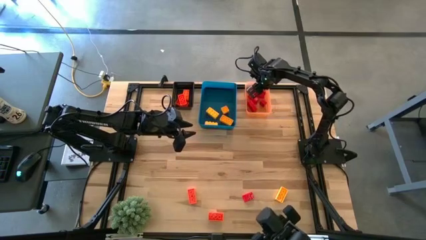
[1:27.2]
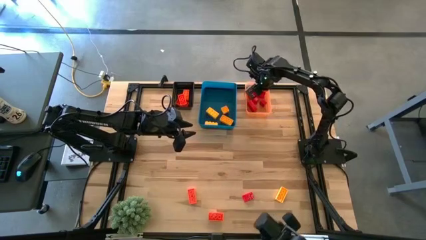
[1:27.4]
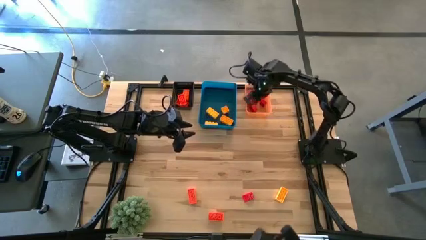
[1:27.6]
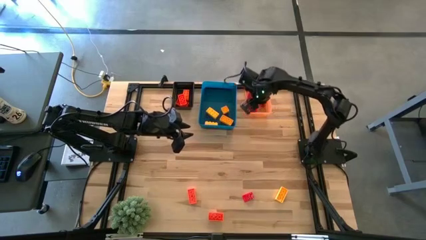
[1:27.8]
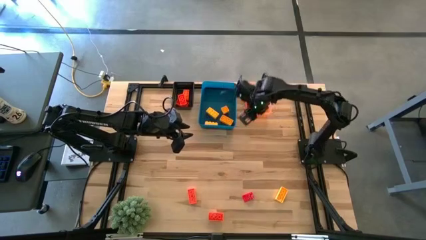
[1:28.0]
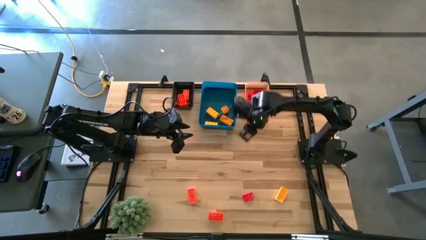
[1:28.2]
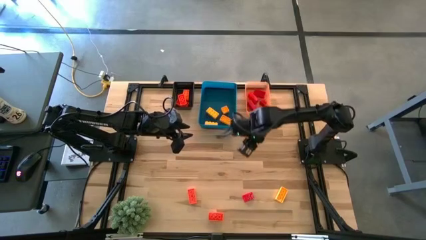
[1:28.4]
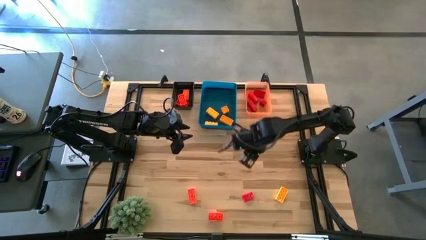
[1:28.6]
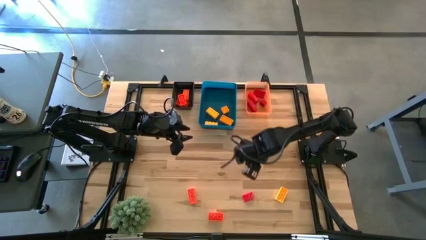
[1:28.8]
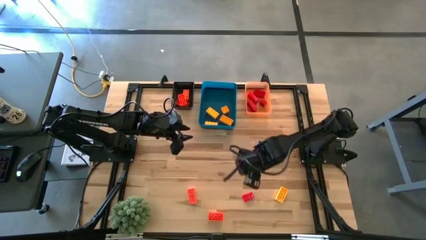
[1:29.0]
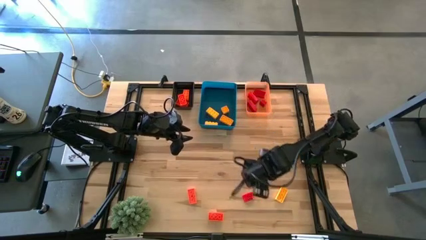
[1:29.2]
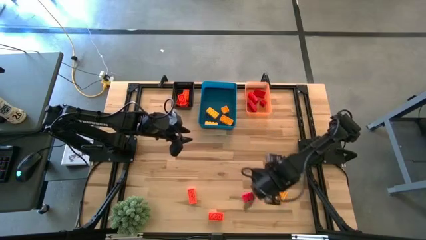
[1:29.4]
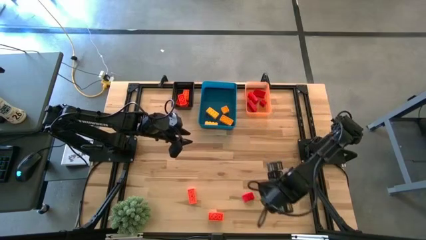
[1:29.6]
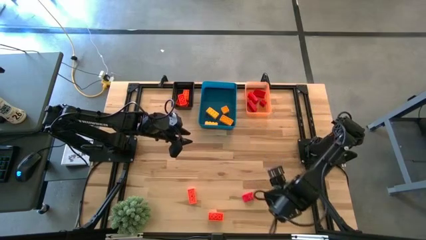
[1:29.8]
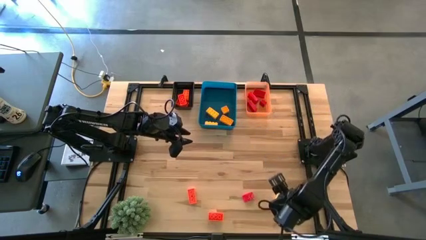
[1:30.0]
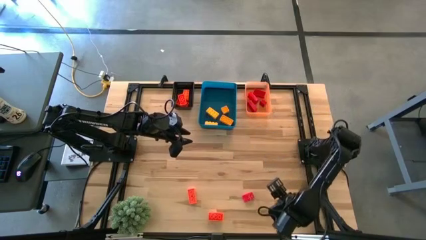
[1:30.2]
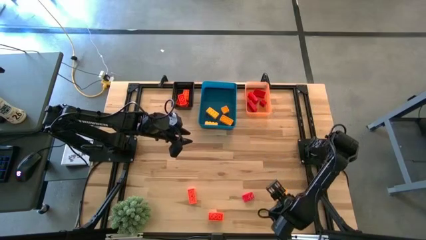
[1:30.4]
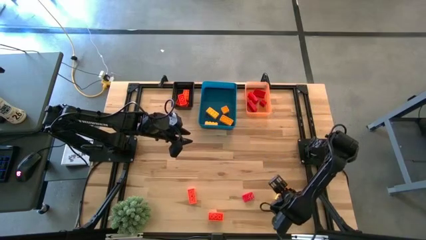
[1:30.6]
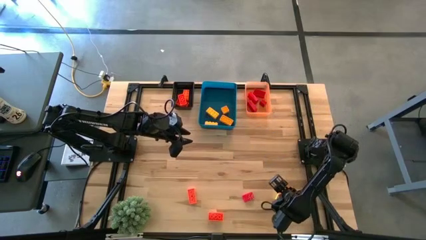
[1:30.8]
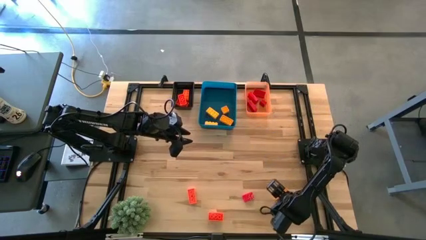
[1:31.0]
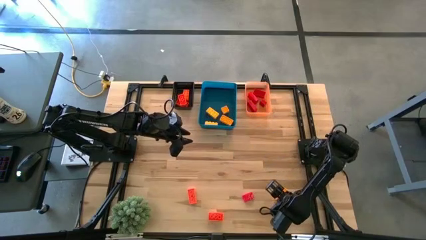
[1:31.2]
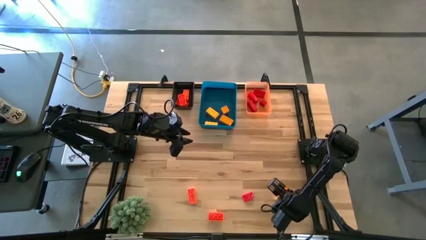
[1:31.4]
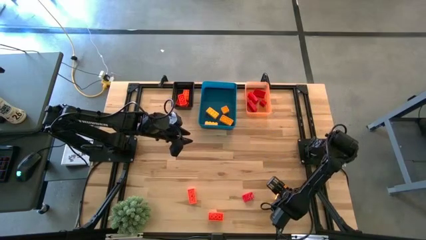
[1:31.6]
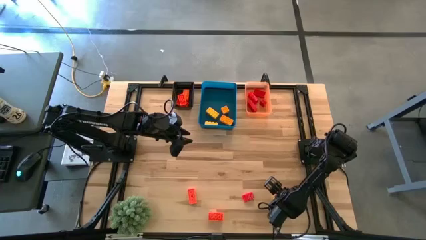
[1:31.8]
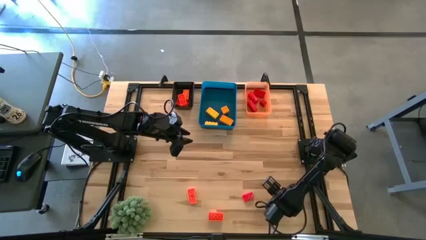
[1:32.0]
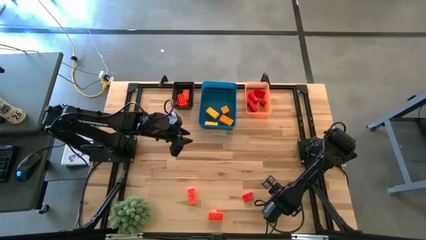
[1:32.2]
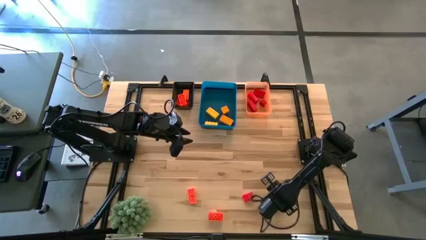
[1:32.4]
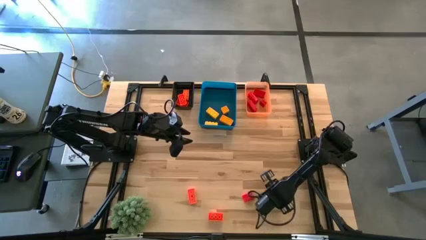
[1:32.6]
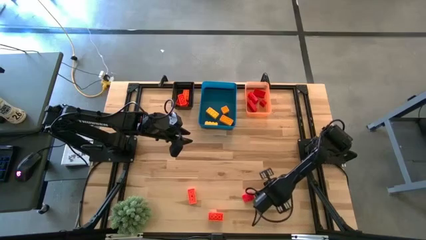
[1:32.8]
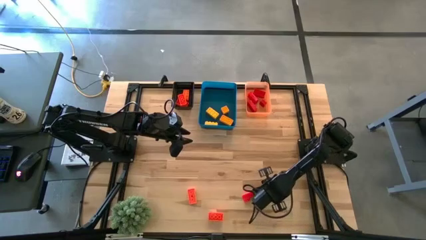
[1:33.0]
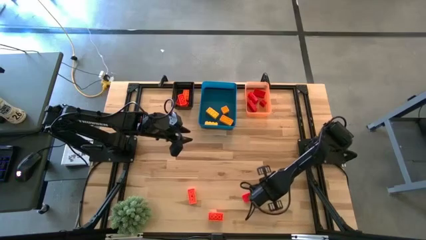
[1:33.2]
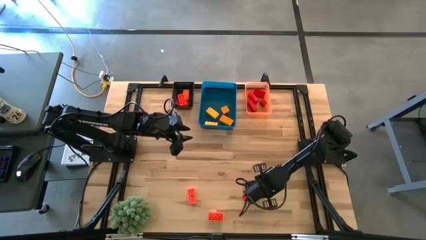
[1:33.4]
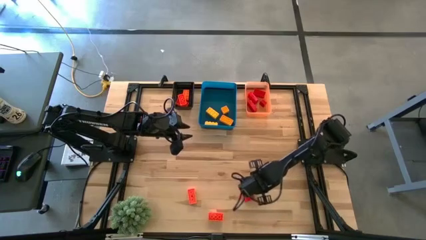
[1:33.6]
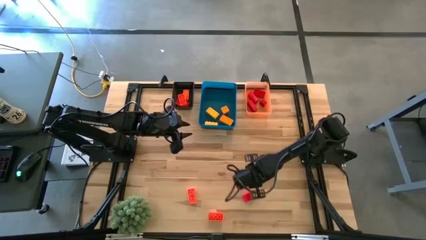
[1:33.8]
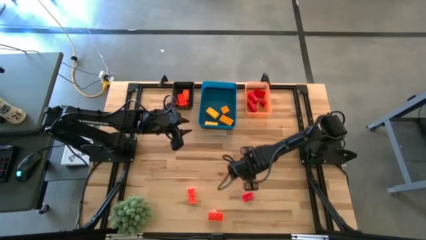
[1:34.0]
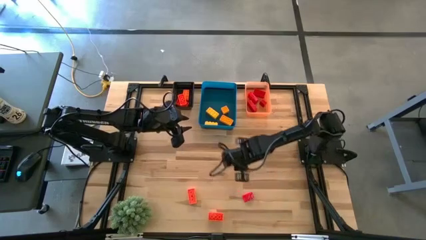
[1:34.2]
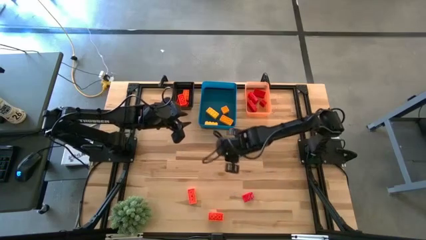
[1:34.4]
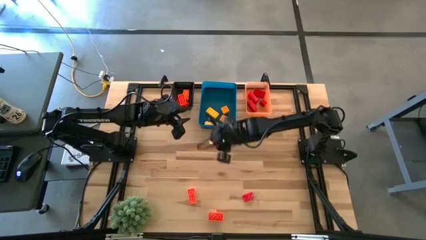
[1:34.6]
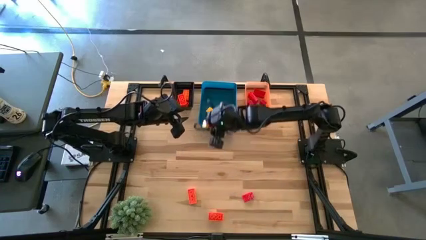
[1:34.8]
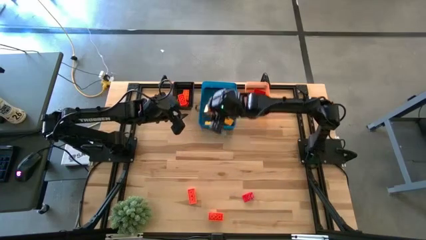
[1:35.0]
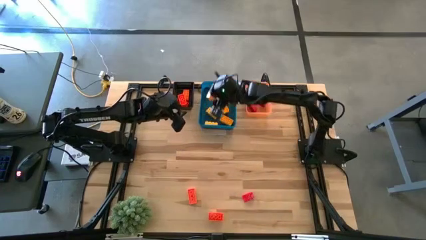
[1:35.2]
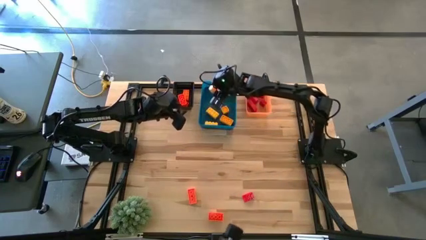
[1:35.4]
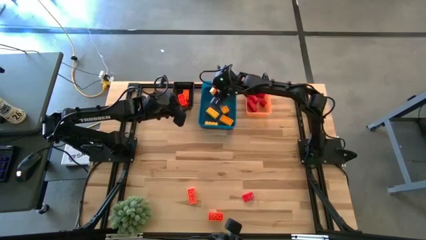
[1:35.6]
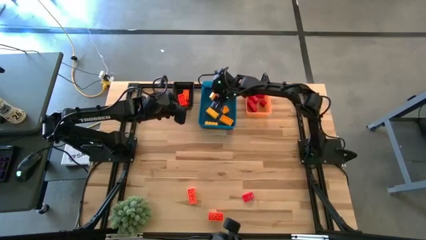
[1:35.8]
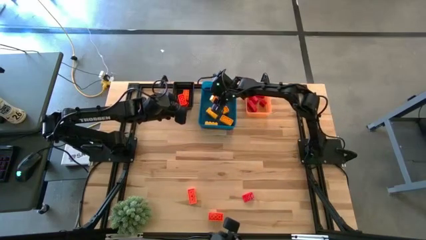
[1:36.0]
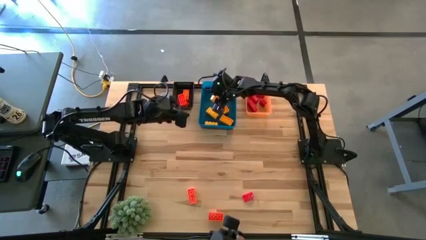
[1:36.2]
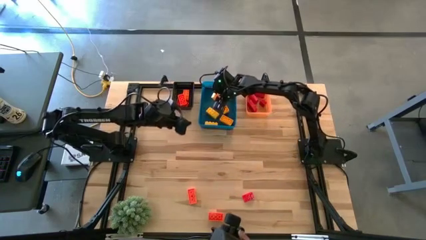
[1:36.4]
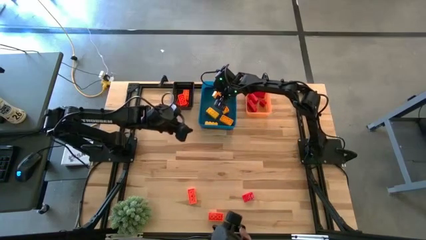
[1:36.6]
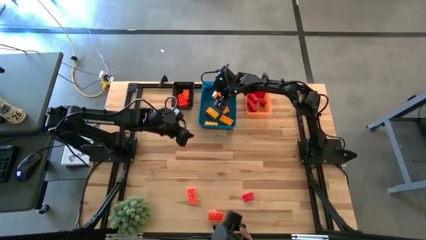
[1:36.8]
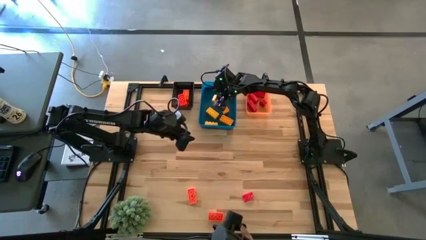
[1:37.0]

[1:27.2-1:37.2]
Task: Sort & place blocks by color
Put the yellow game piece into the blue bin

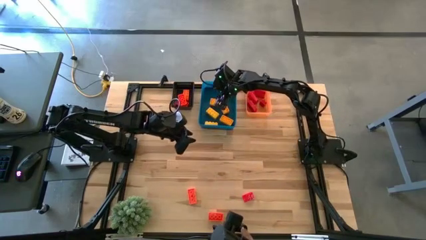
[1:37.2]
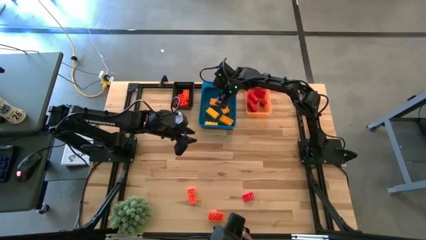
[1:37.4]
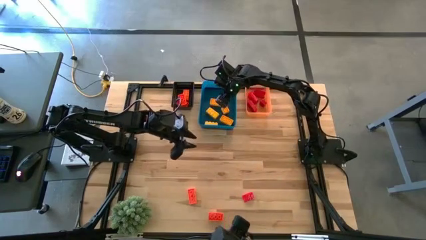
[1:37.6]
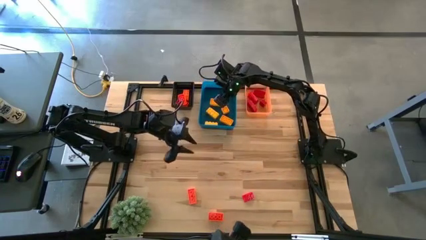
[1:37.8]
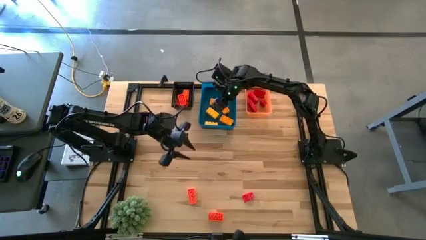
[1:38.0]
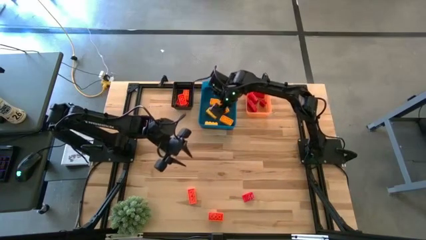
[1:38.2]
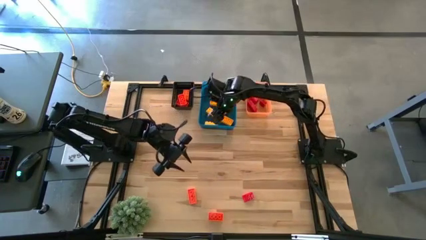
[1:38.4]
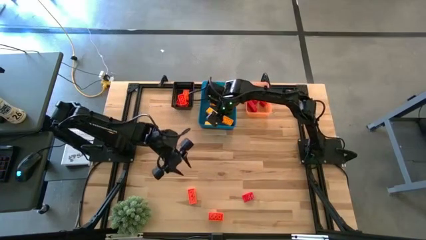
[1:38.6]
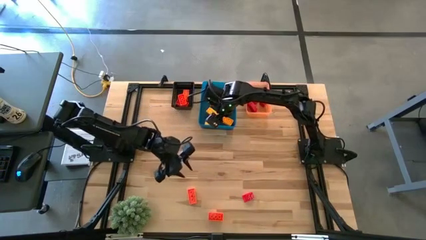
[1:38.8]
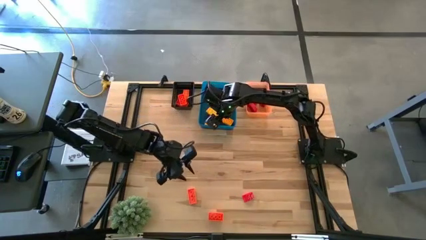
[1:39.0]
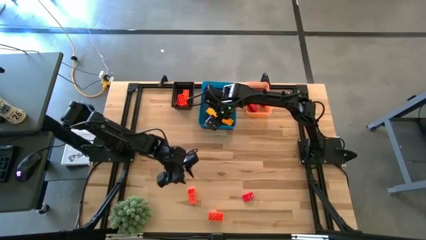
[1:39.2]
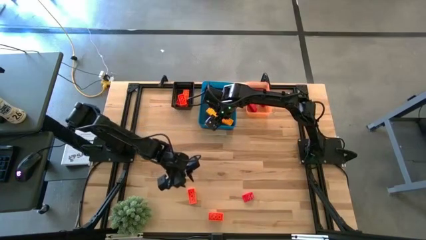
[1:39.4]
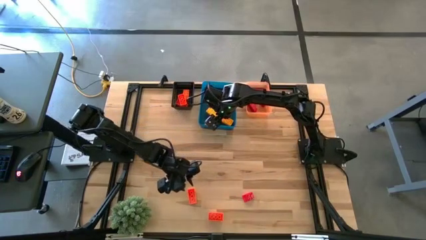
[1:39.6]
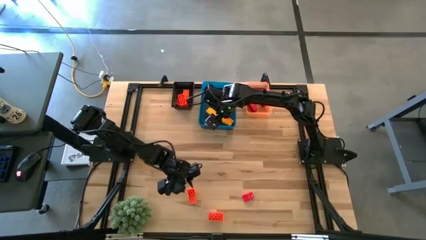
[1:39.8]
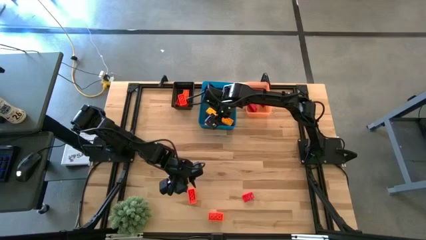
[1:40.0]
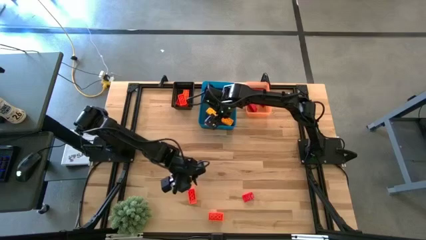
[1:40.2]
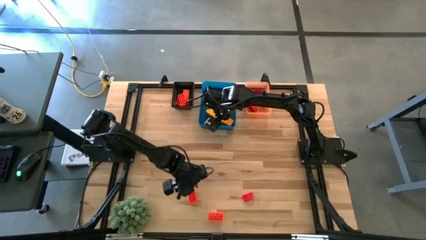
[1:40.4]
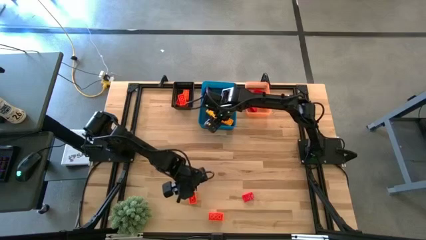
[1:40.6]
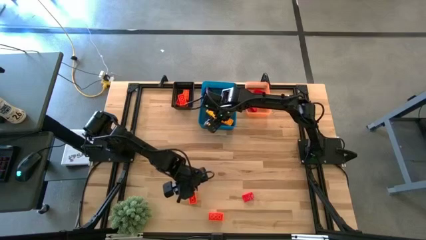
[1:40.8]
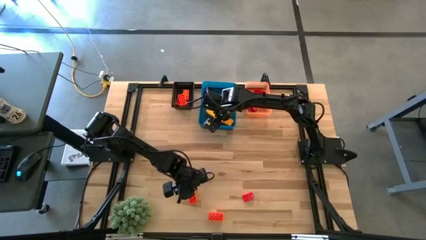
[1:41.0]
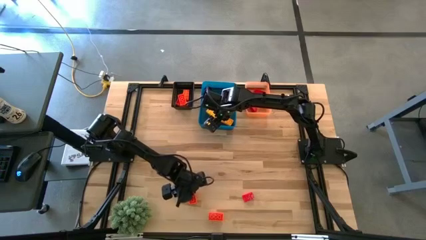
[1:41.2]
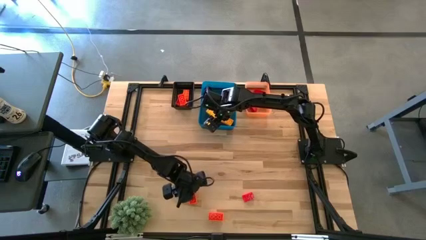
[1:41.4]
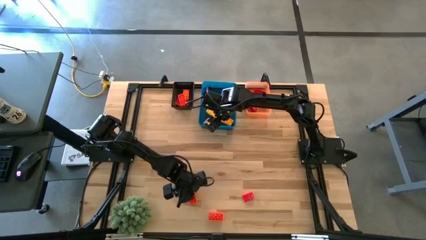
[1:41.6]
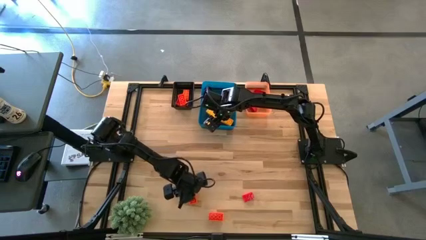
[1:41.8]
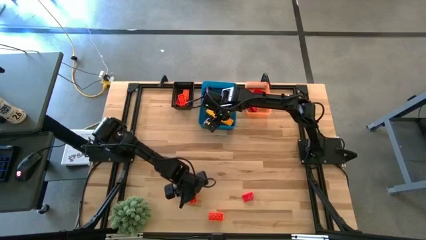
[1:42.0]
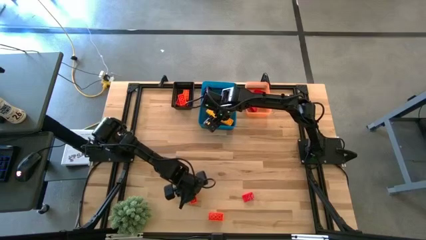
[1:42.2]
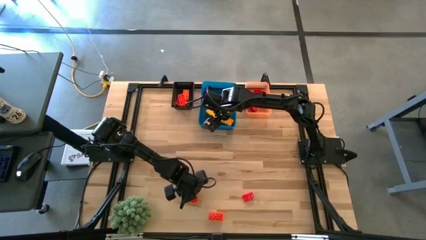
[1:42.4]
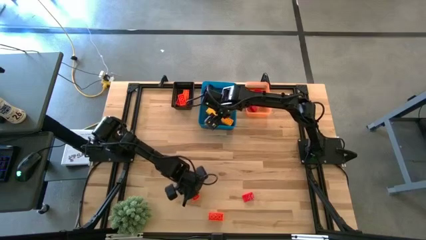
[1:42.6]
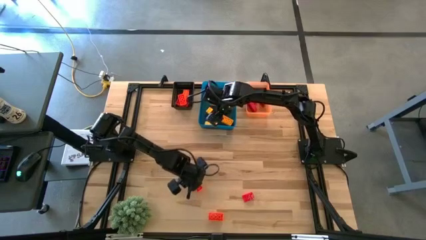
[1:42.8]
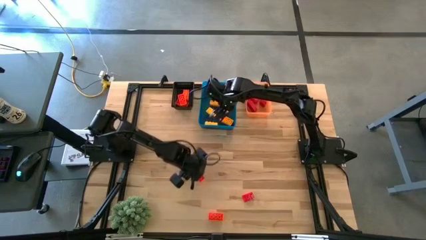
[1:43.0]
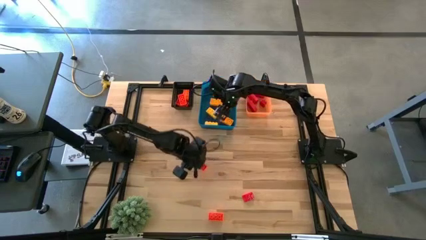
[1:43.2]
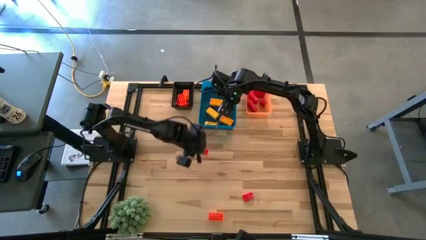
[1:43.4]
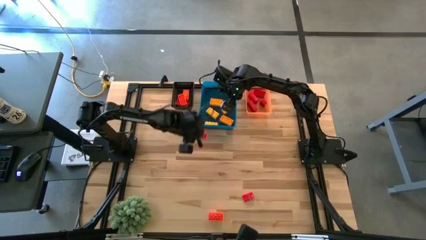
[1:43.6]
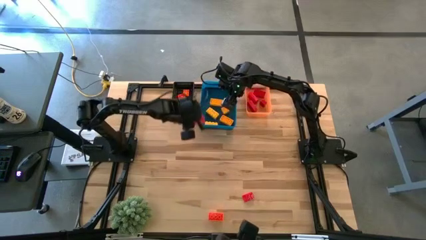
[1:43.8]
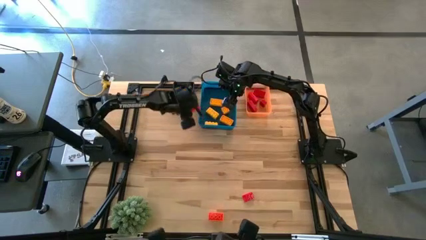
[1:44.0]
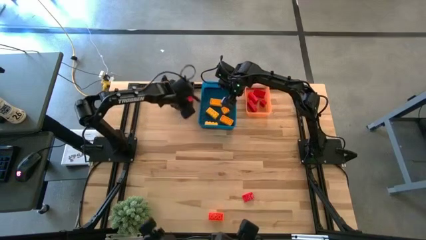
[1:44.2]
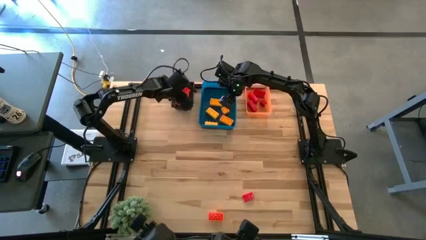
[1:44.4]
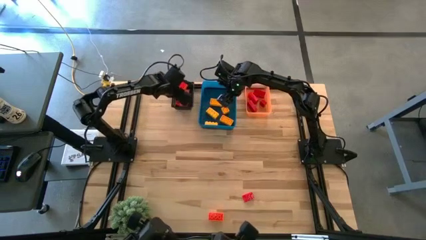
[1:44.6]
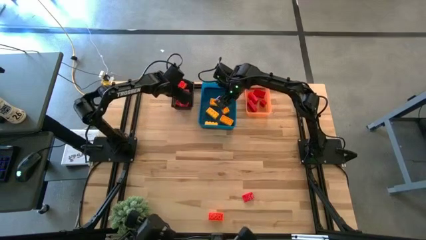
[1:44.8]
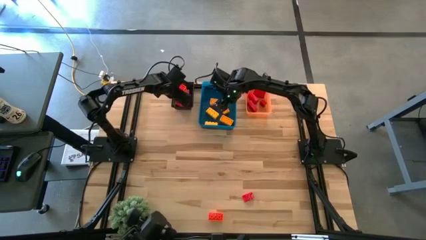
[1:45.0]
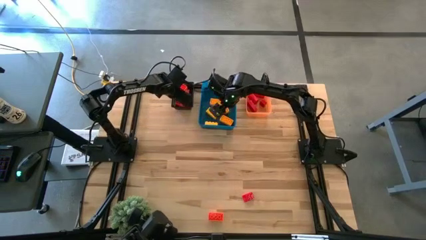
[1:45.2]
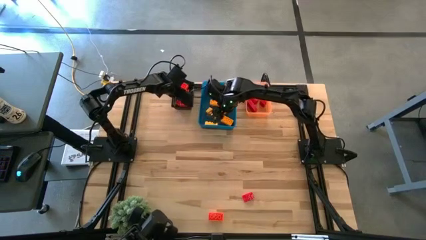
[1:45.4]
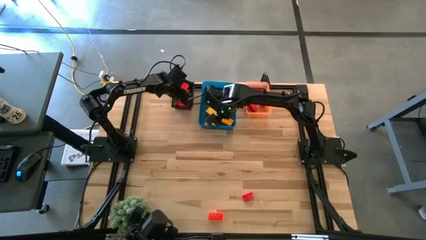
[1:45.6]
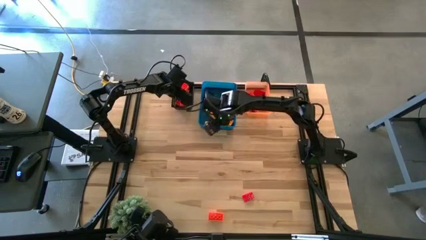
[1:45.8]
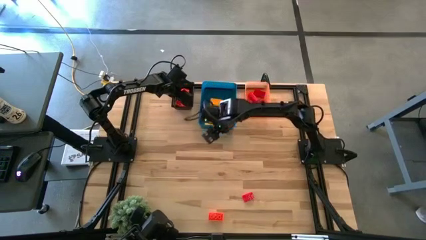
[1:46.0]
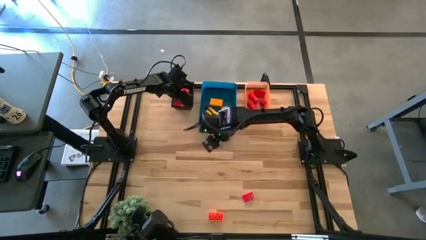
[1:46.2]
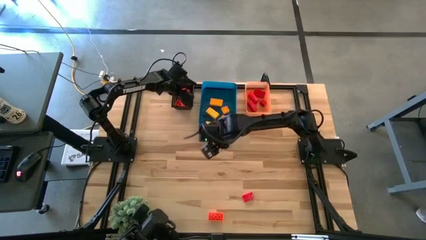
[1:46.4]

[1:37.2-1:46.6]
Put the orange game piece into the black bin
